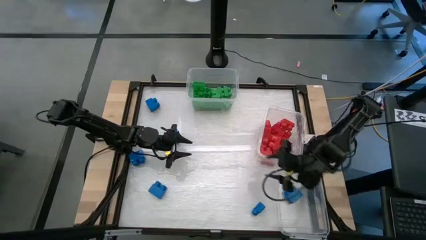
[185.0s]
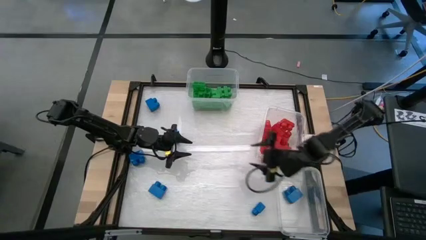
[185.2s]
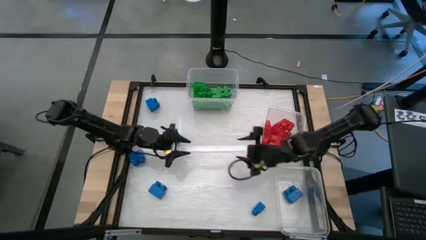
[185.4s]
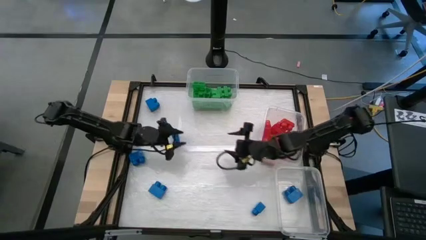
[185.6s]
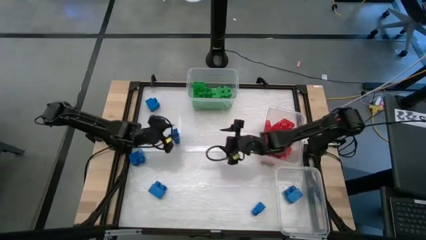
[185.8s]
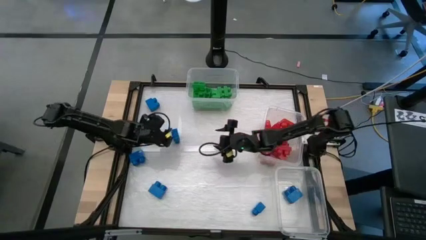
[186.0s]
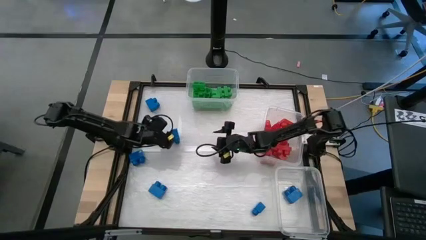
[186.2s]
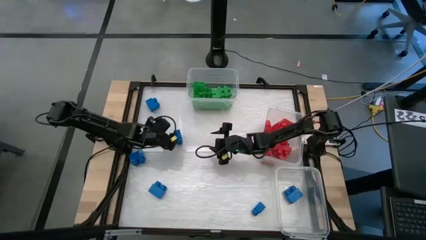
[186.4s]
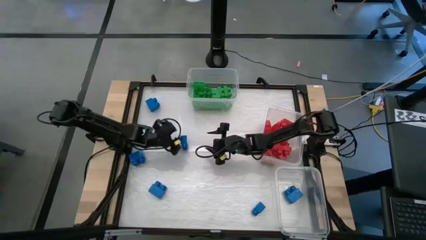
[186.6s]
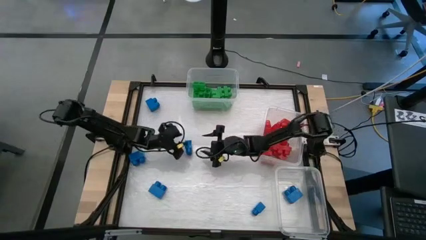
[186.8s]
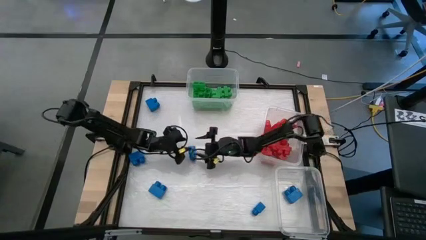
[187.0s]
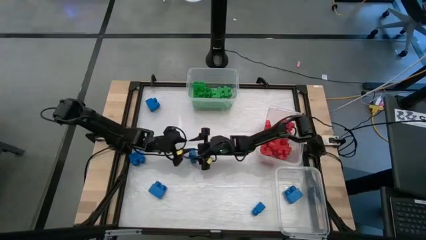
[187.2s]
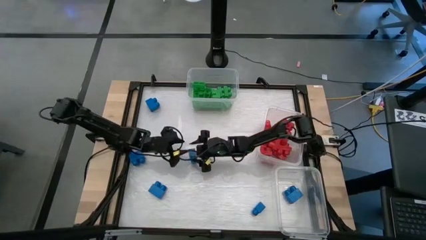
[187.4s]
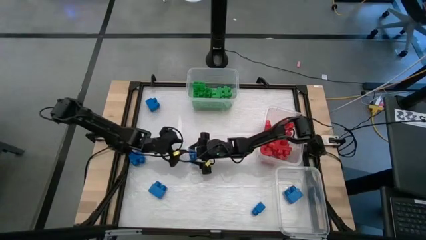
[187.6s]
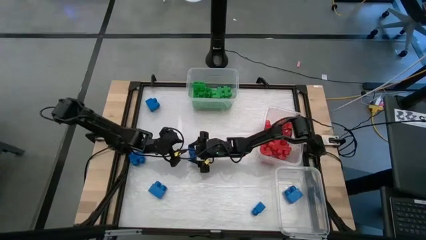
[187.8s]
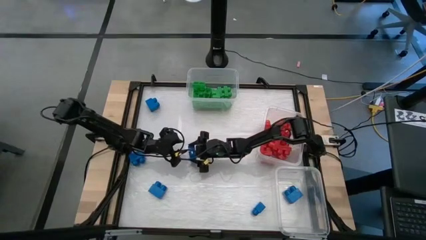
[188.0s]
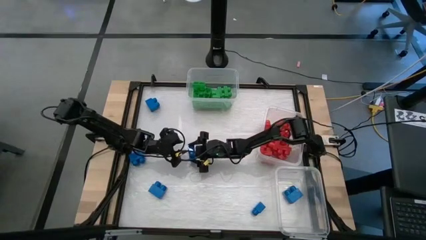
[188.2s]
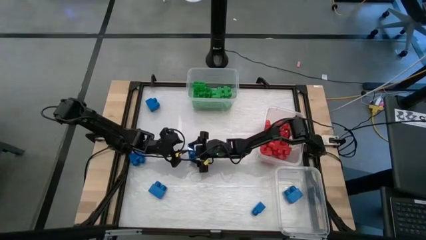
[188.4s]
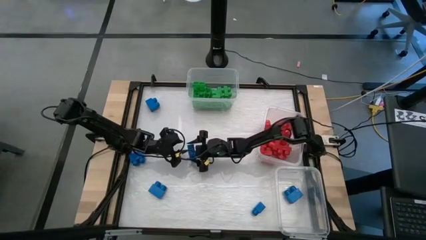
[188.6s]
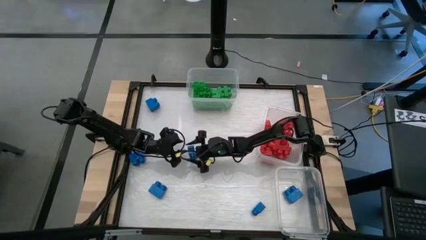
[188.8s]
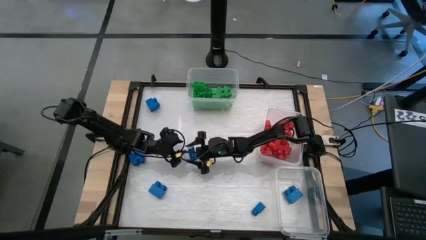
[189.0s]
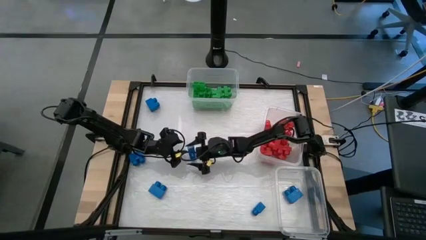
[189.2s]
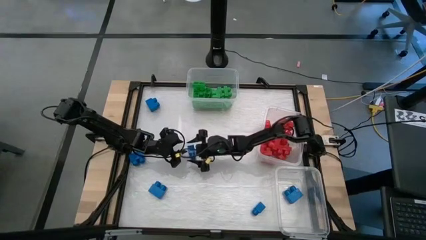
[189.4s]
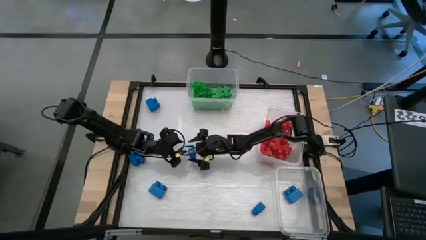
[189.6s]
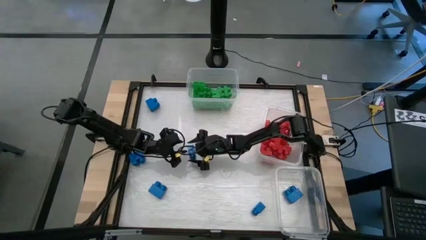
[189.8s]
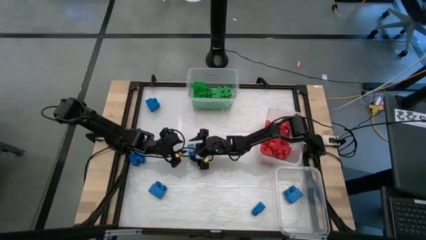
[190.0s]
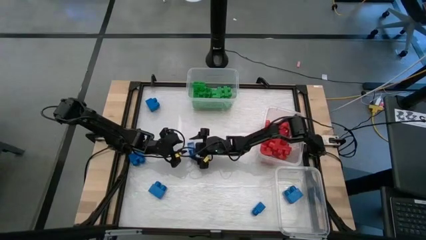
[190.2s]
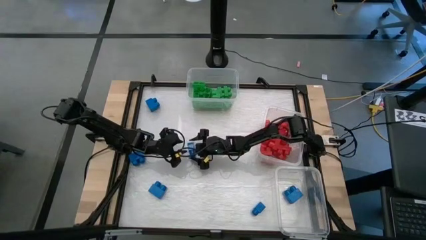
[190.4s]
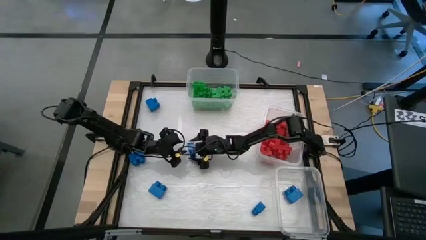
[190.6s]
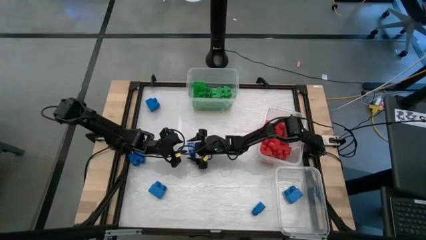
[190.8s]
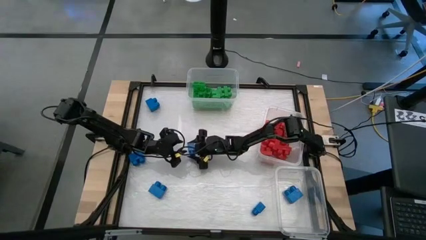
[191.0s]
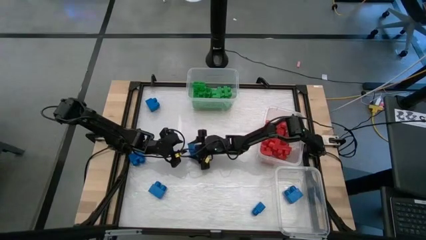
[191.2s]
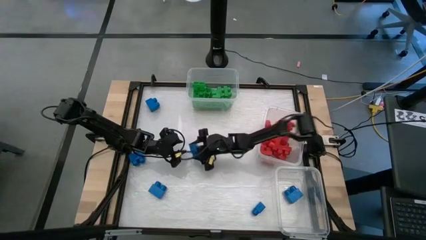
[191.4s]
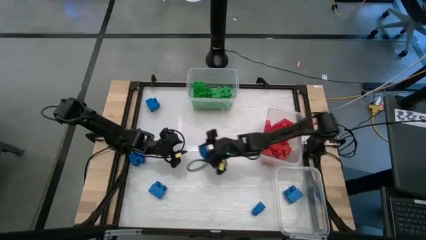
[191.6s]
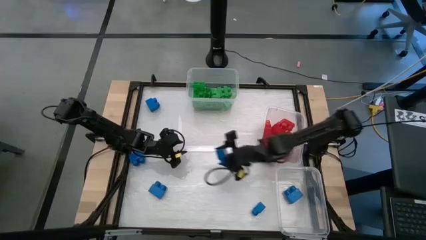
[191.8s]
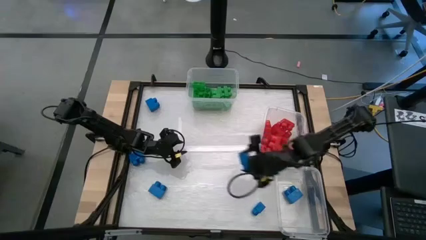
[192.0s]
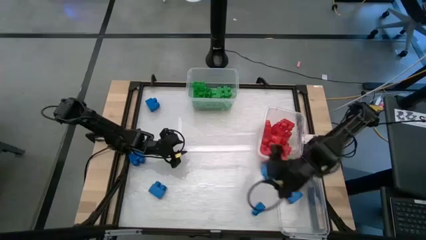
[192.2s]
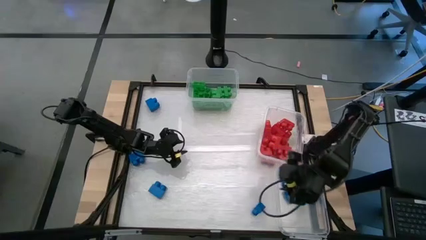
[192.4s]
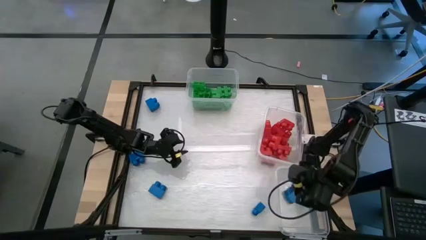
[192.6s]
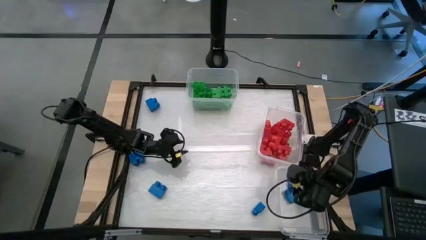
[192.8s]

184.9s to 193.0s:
Task: Sort blocks
Put the blue game piece into the bottom right transparent bin

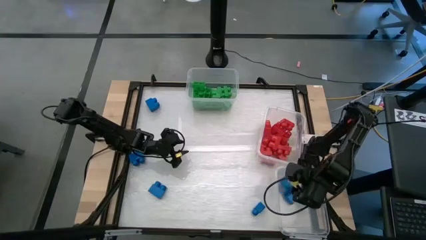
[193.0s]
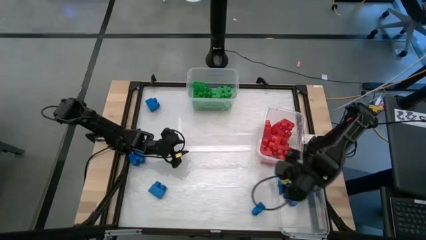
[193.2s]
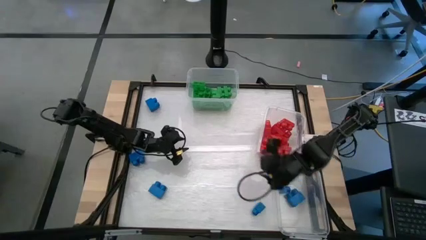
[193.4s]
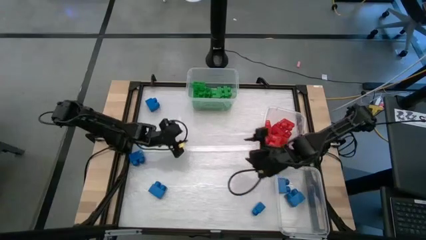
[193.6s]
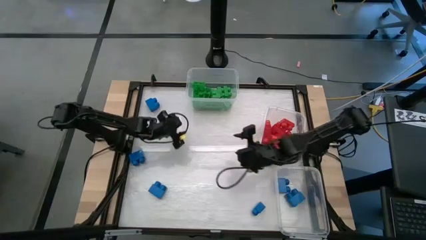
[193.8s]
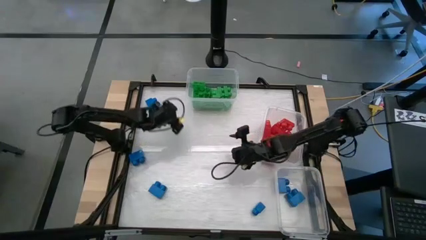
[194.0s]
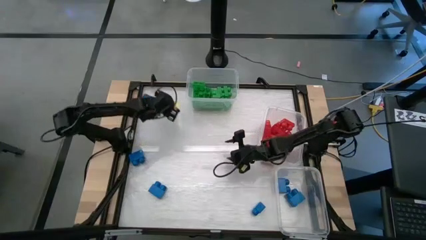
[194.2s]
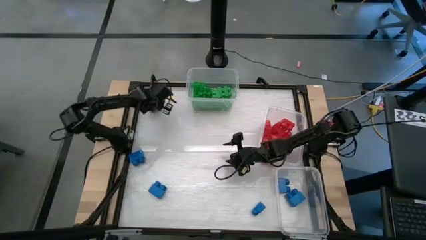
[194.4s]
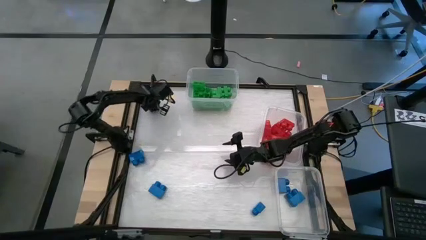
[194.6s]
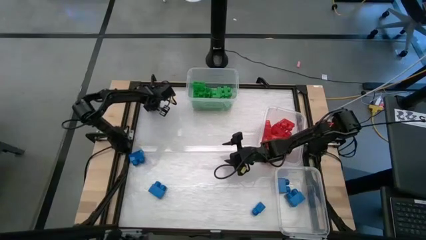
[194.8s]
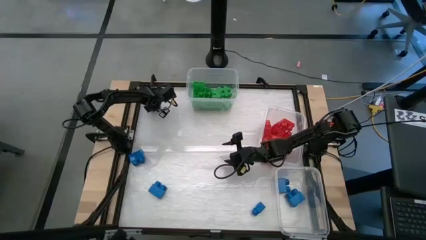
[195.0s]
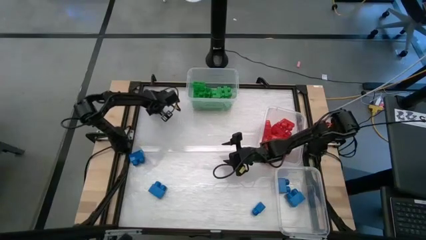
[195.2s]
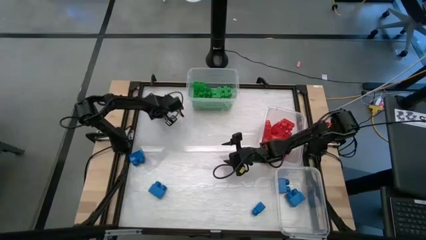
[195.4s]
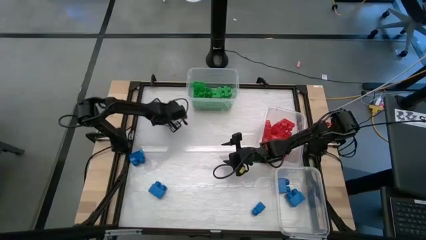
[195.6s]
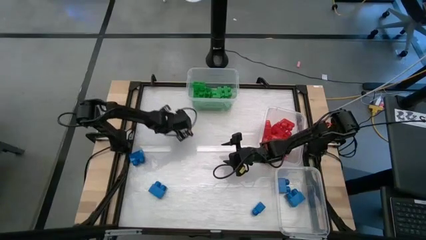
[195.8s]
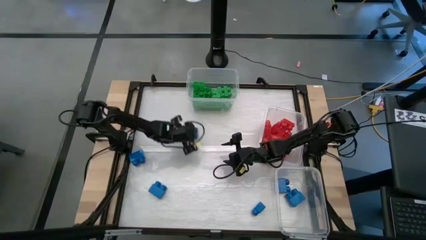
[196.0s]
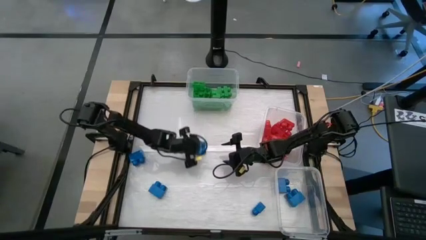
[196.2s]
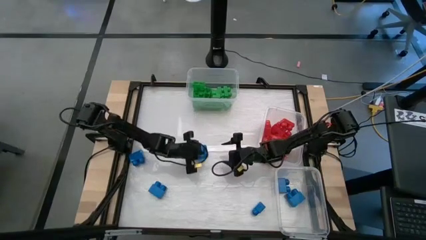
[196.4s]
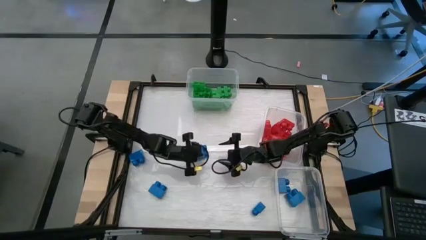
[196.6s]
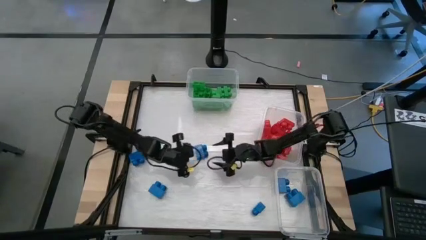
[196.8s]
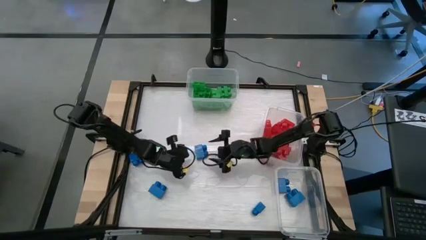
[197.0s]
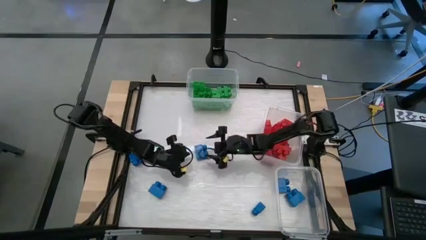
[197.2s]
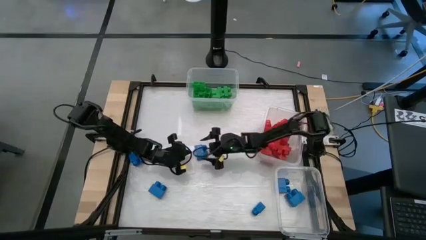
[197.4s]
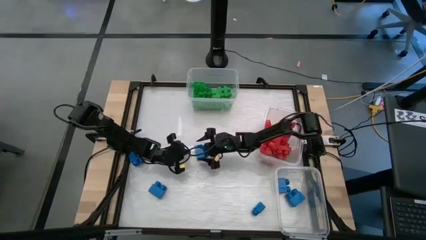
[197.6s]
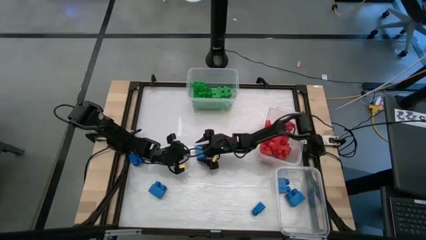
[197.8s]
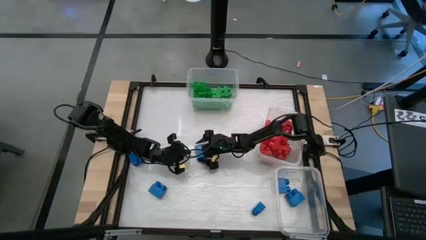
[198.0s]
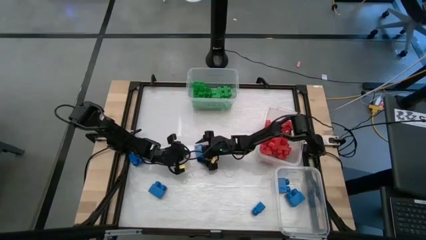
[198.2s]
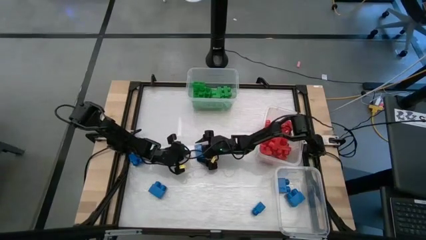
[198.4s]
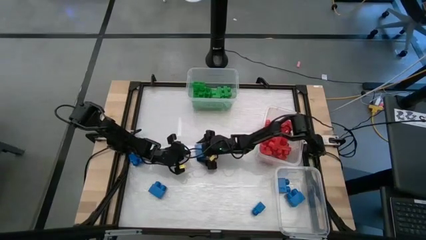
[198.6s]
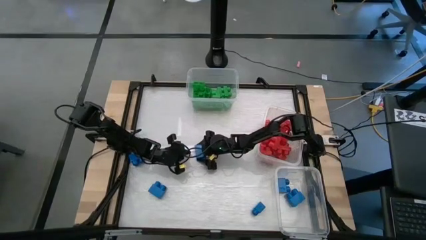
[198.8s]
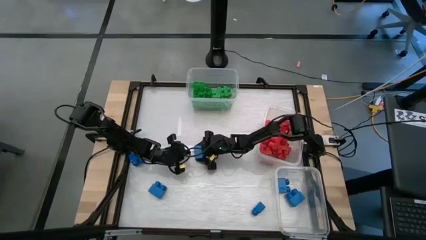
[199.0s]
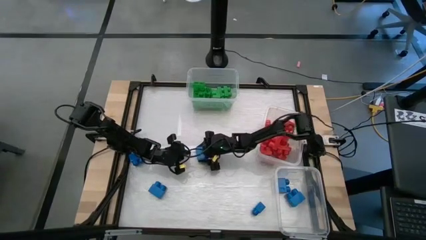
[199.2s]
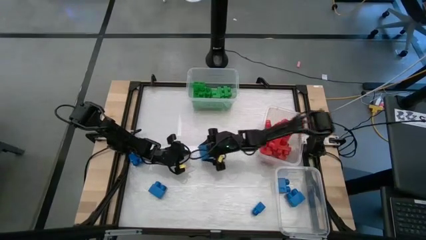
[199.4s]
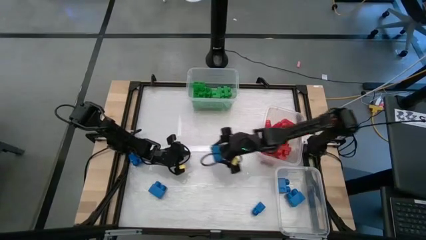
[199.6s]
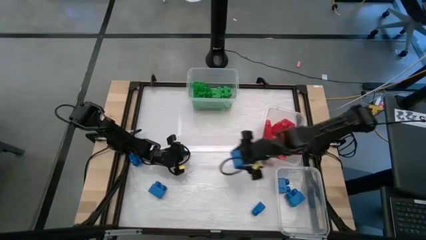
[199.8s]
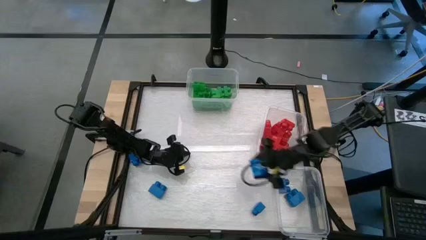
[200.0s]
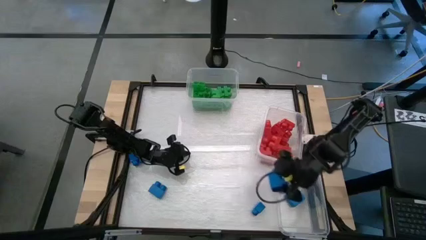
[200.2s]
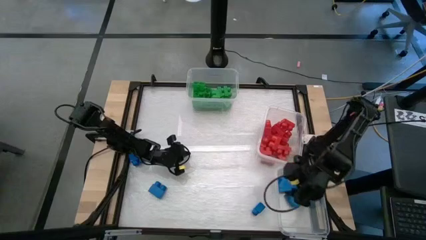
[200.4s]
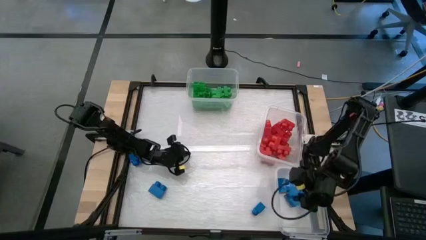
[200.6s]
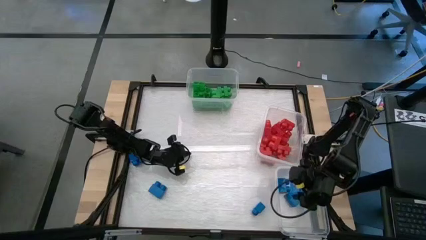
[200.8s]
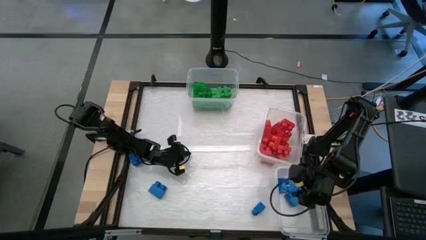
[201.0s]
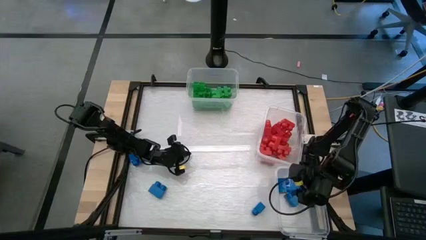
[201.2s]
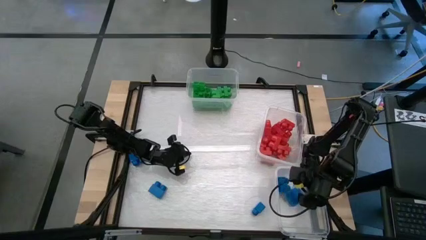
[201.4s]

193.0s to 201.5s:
Put the blue game piece into the bottom right transparent bin
